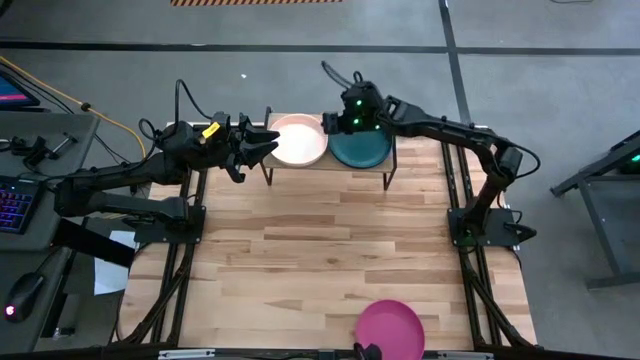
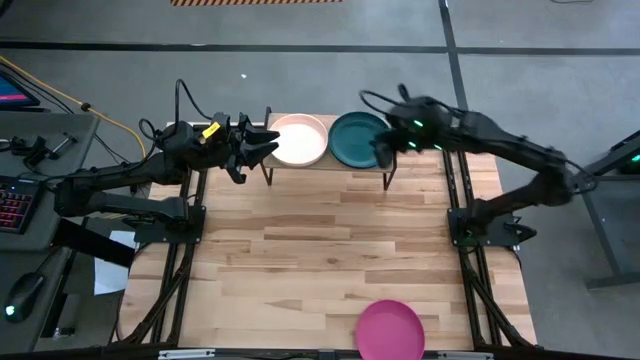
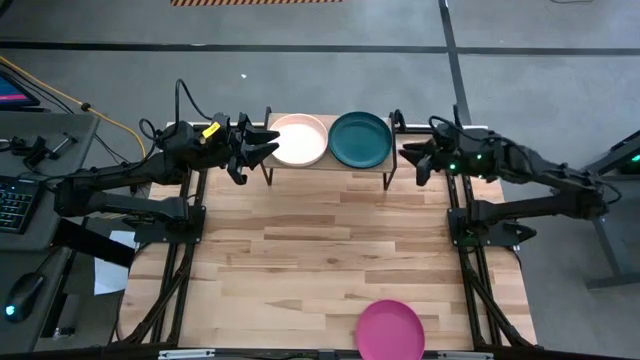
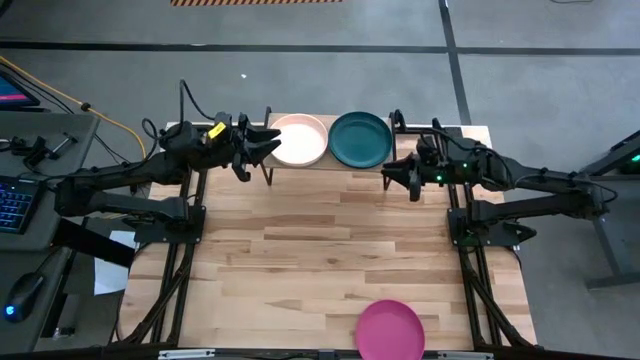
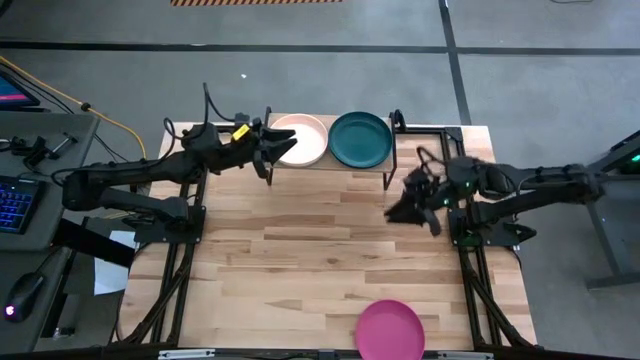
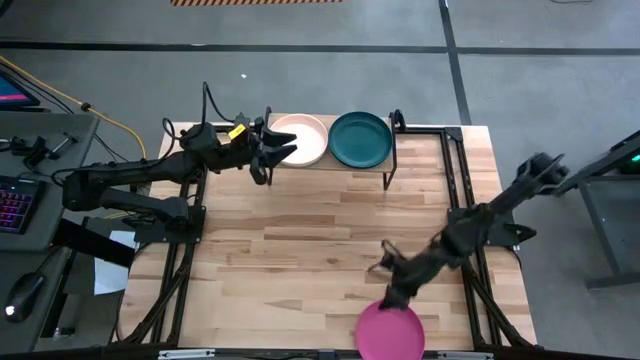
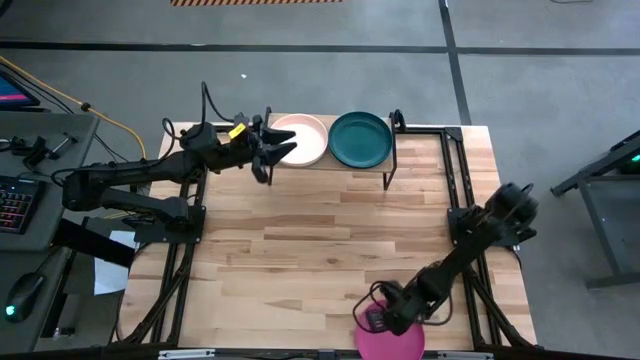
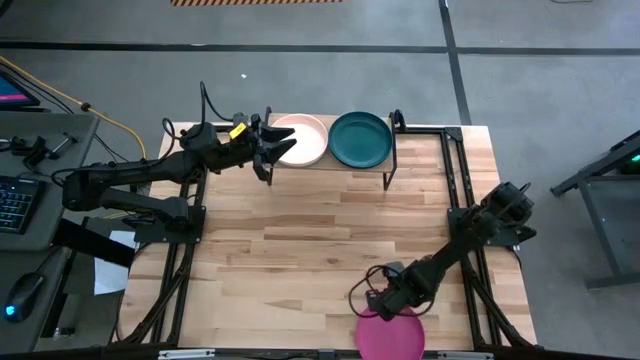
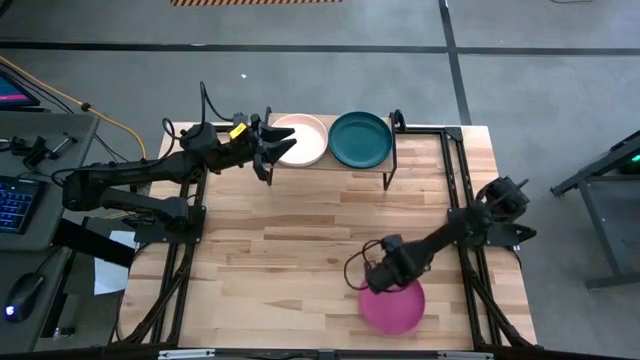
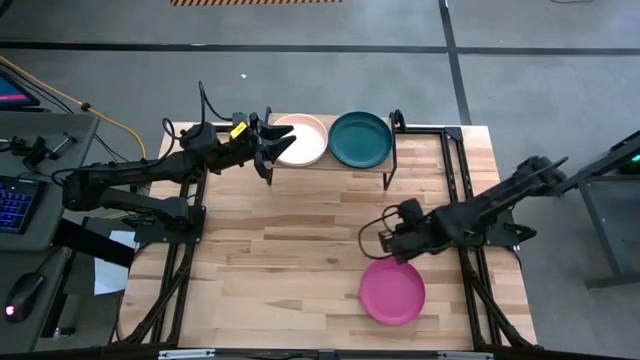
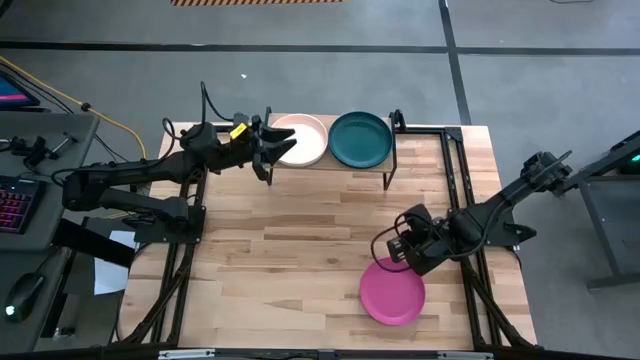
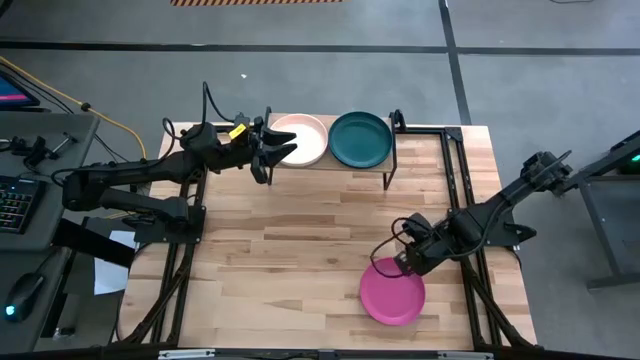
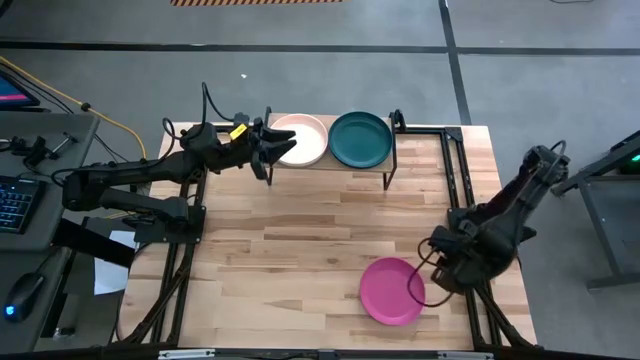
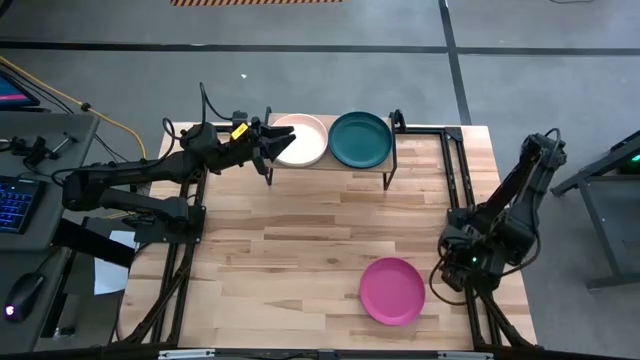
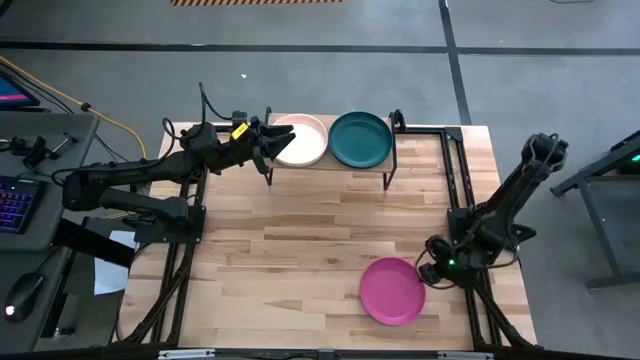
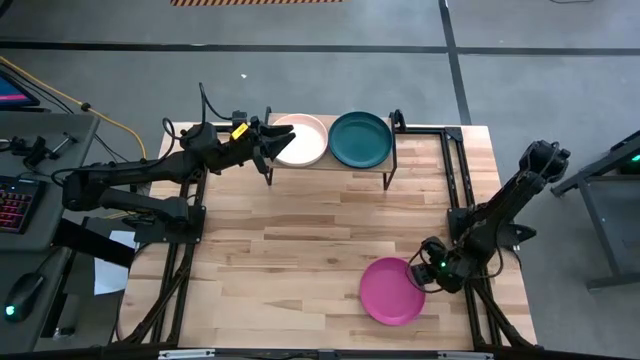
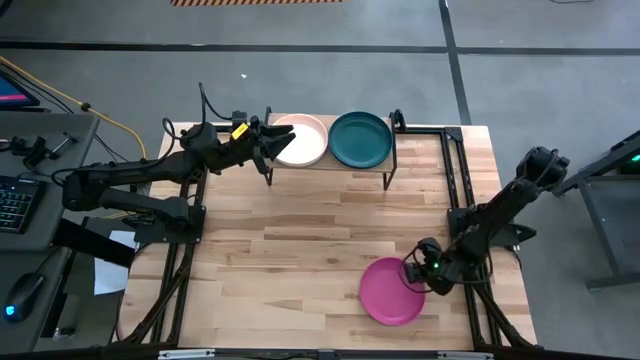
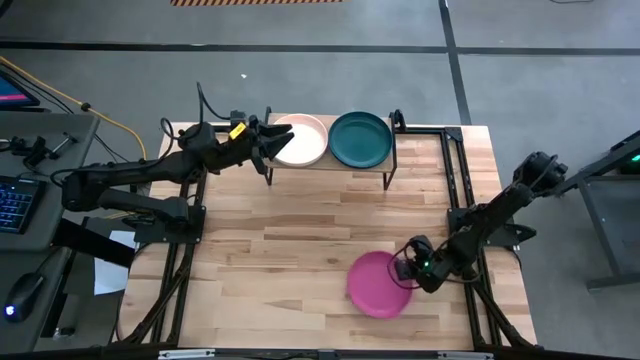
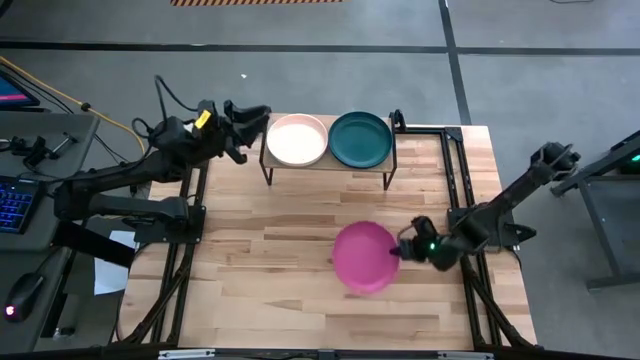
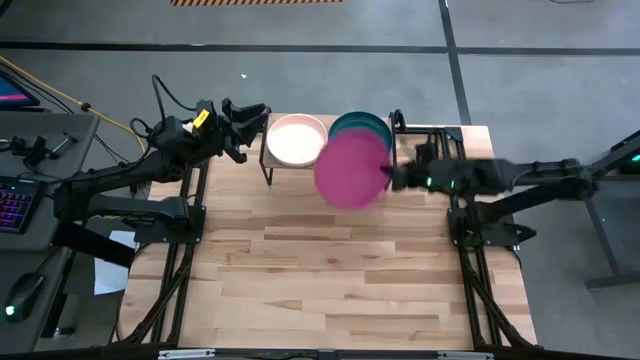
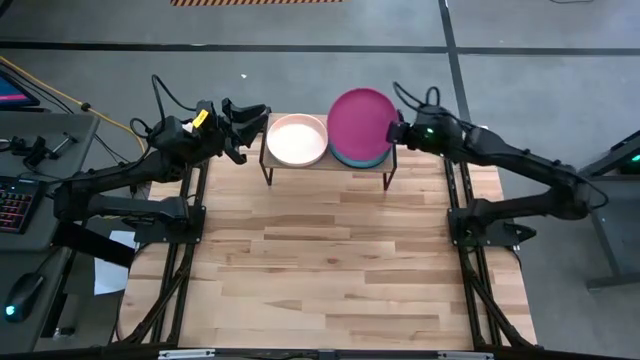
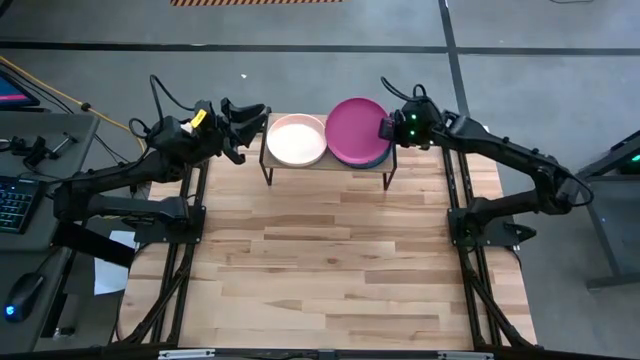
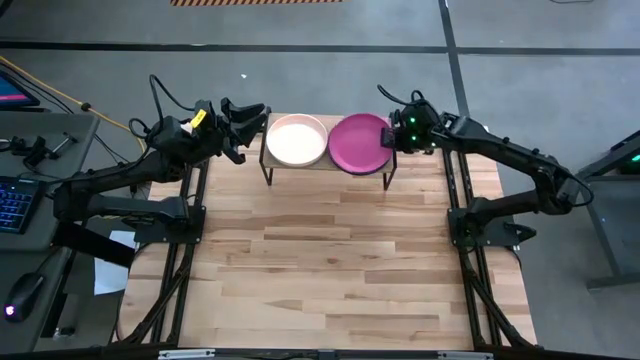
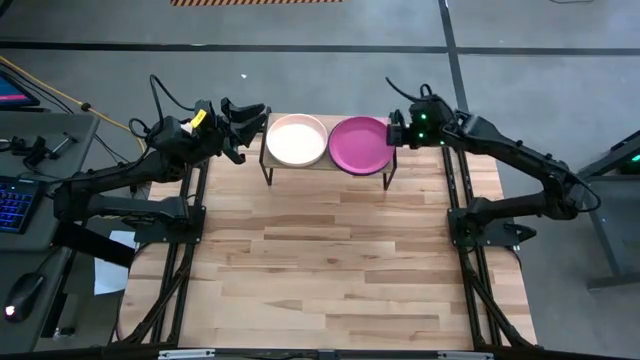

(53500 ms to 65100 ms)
Task: Place and stack plates onto a shelf
Stack the pink plate on top of the dark green plate on the shelf

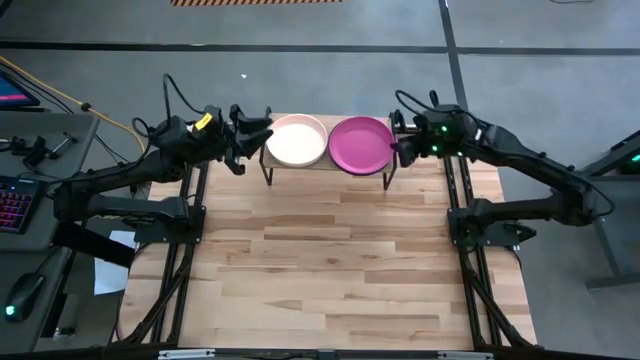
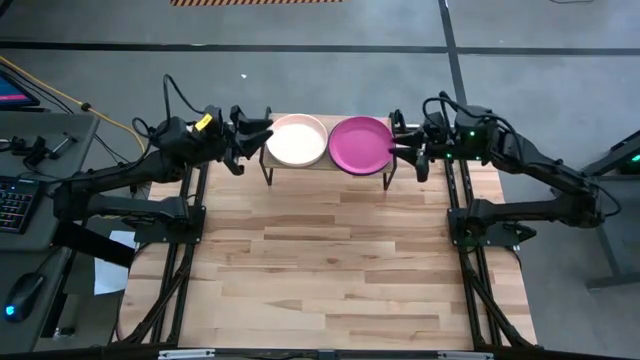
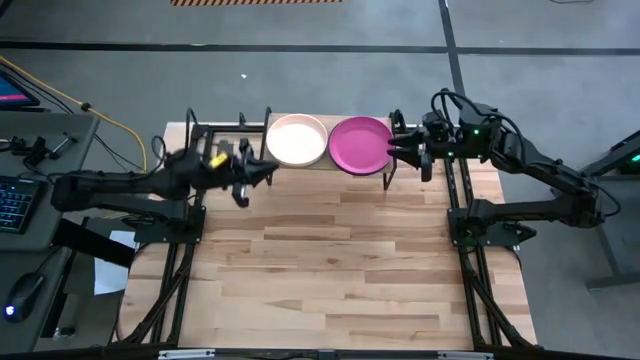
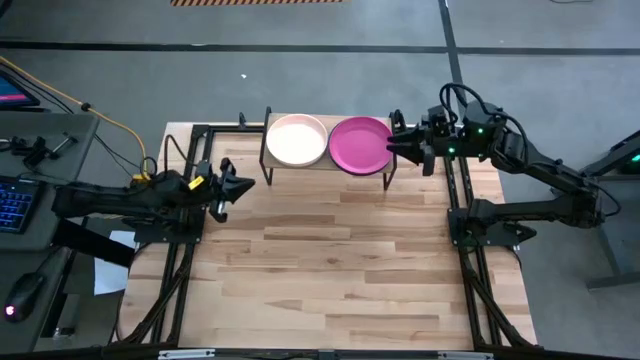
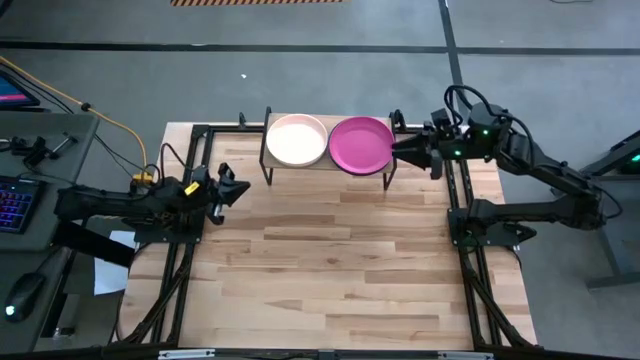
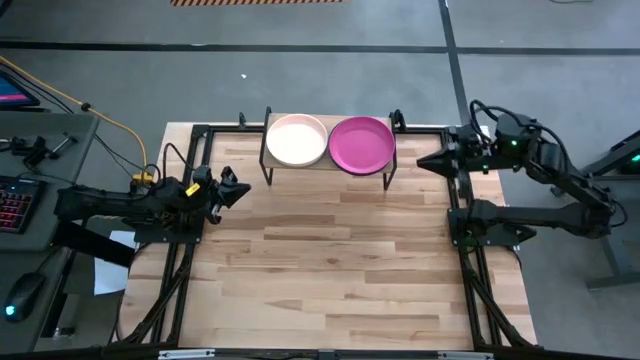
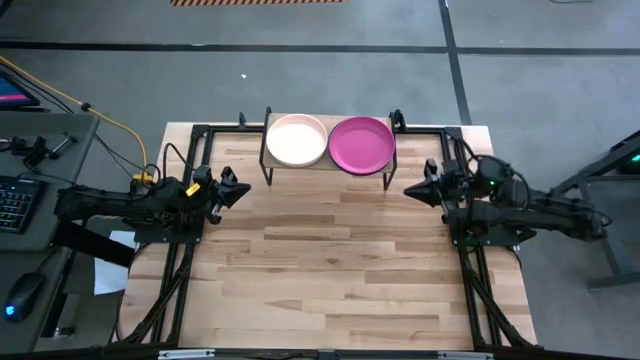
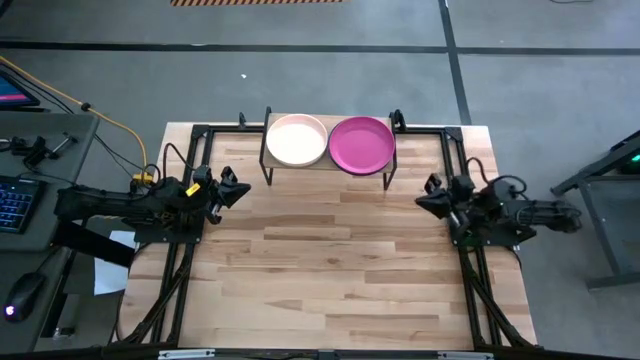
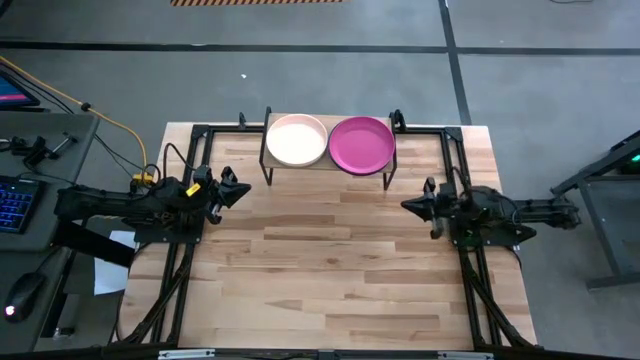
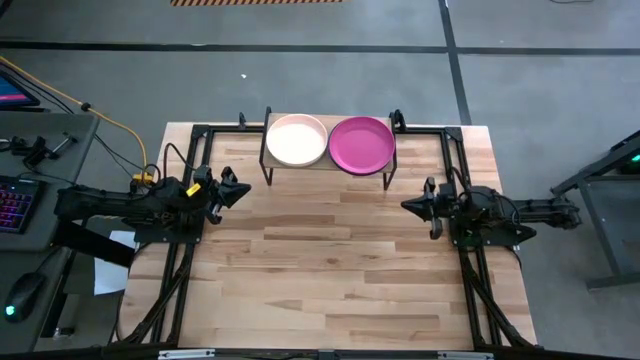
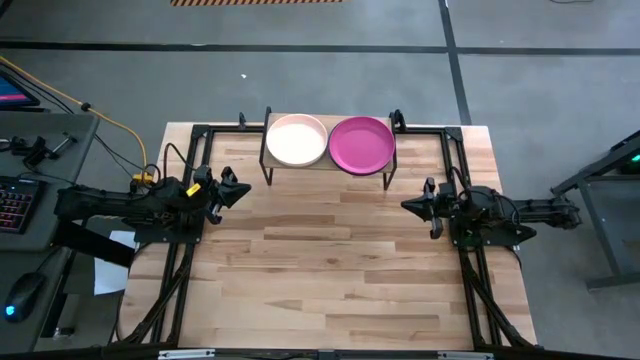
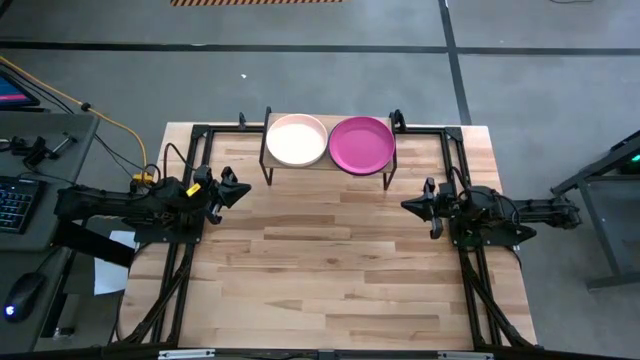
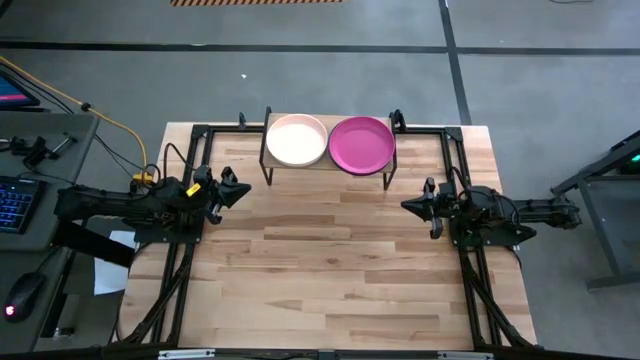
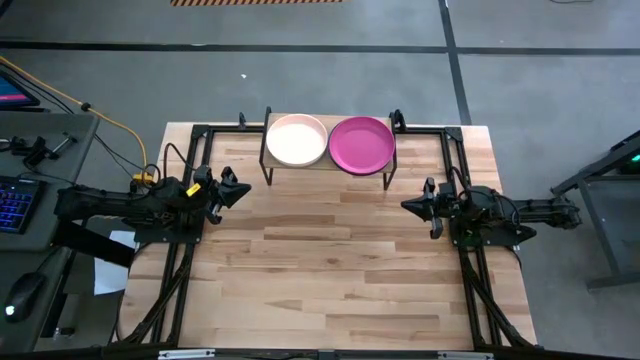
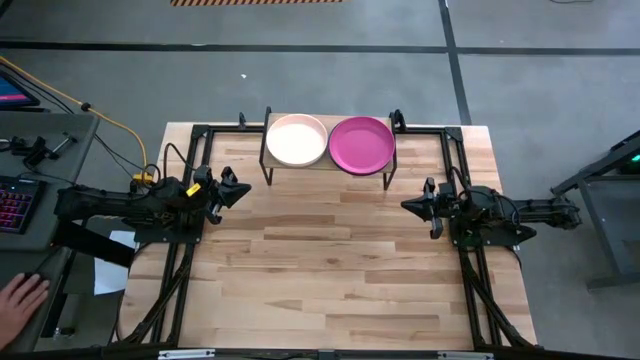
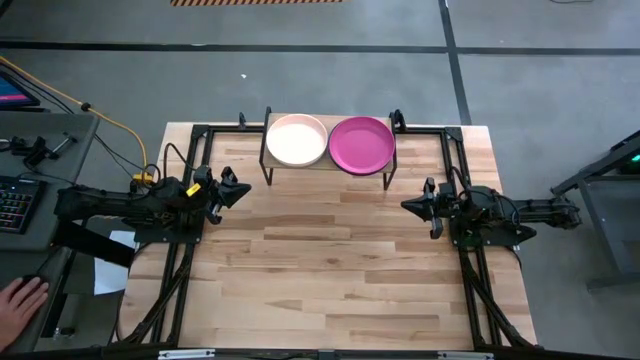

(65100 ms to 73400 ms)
Return to Home Position
